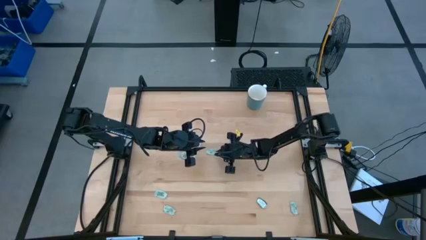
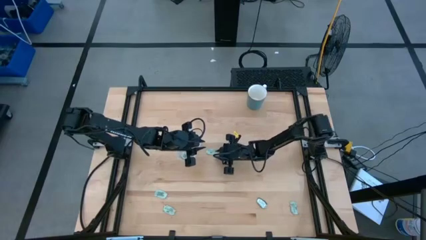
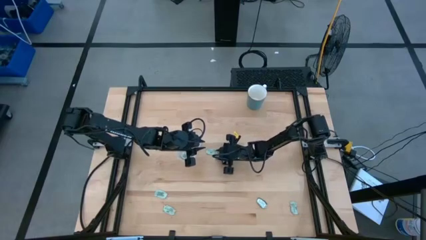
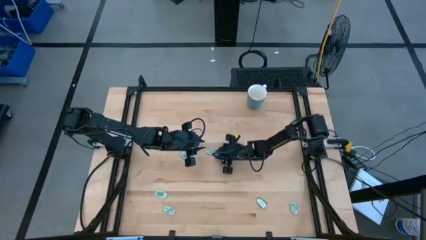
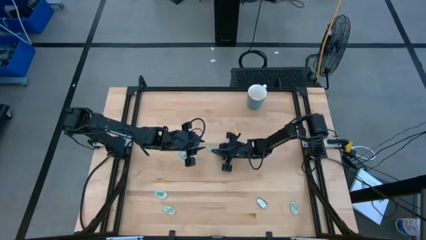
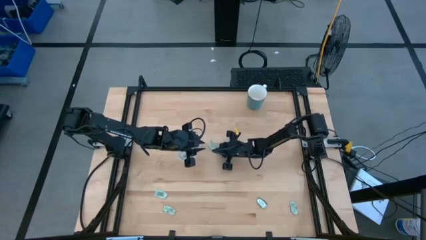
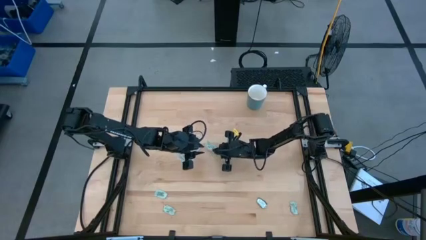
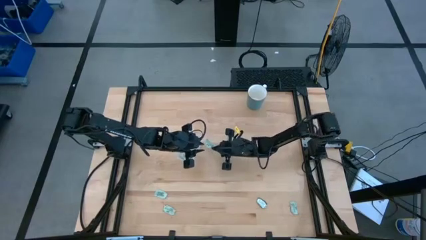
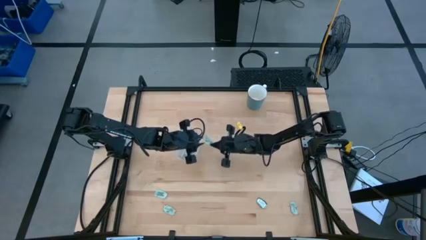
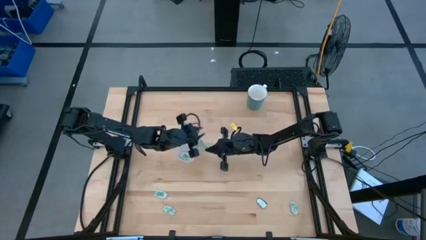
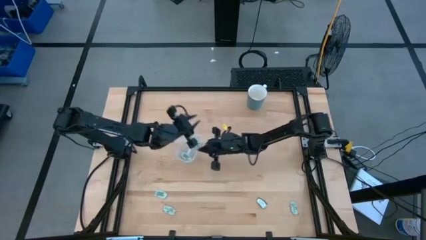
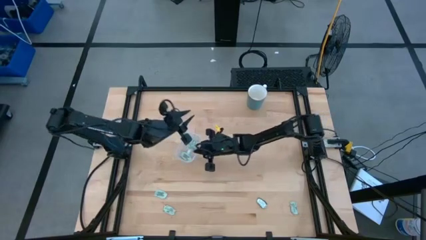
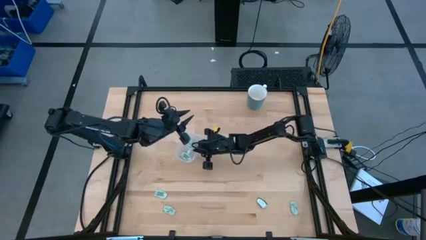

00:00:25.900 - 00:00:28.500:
Task: Pick and place Stevia / Truvia into bins
Put the green stevia packet into the transparent bin

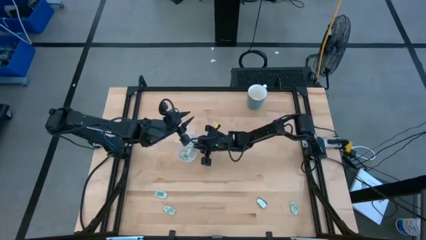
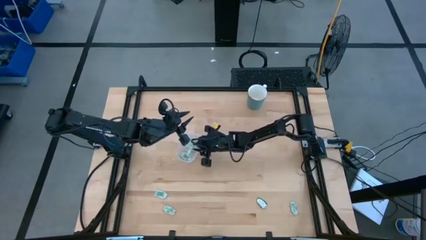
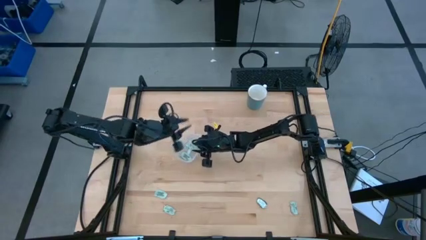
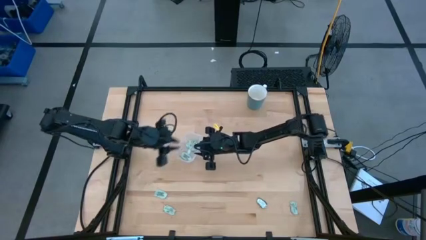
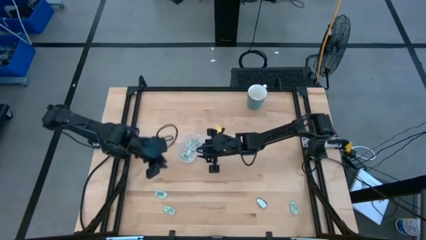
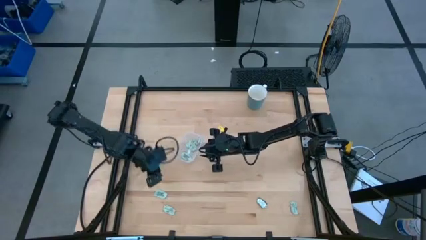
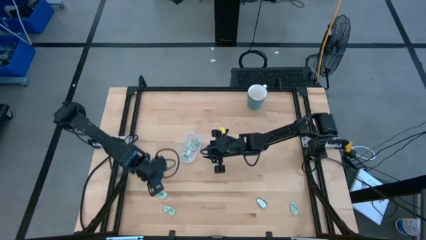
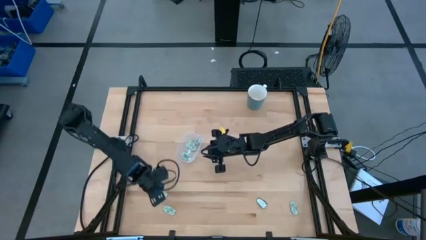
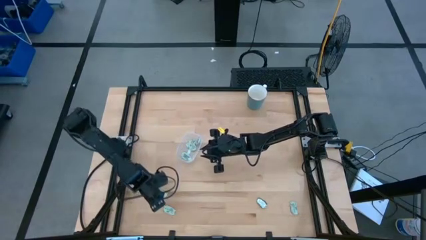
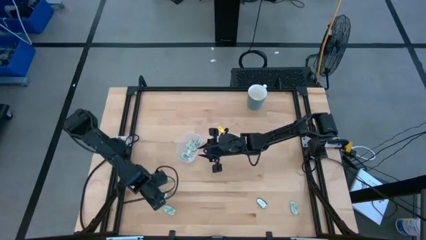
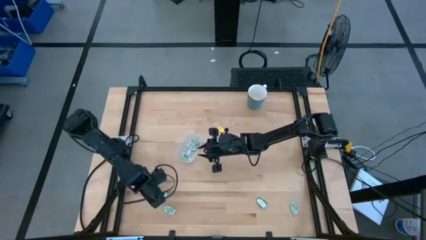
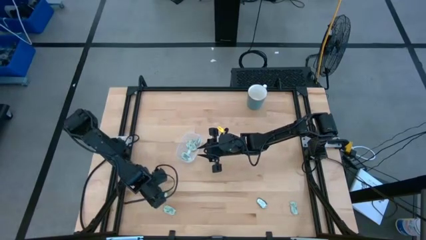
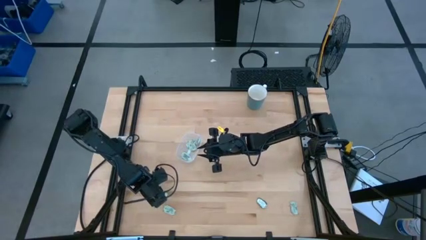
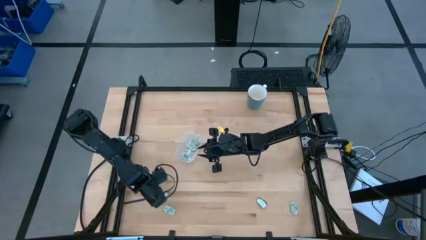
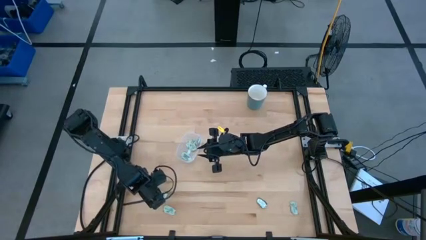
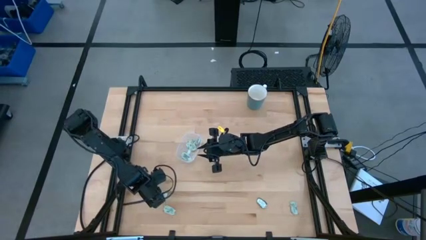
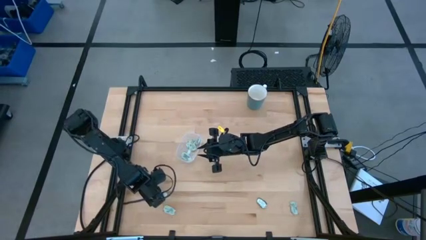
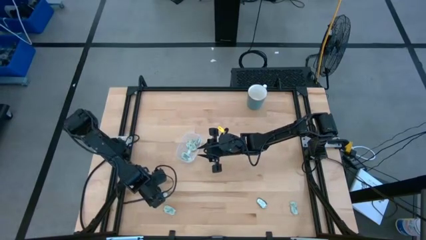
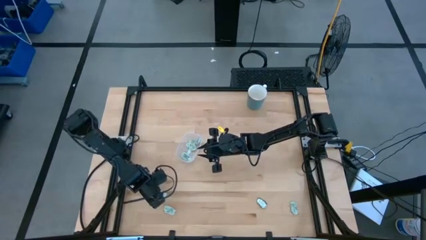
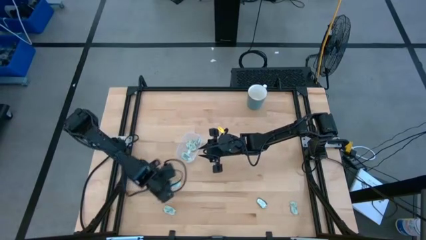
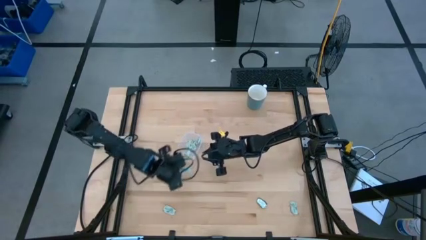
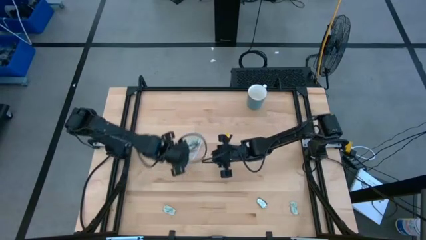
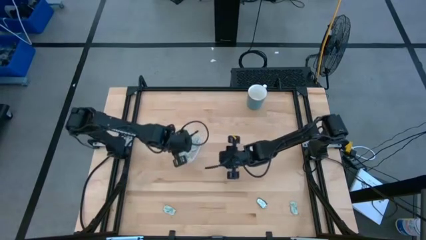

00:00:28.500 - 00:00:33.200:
Put the green stevia packet into the transparent bin

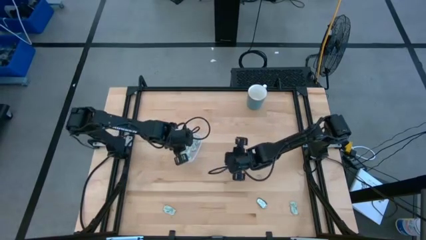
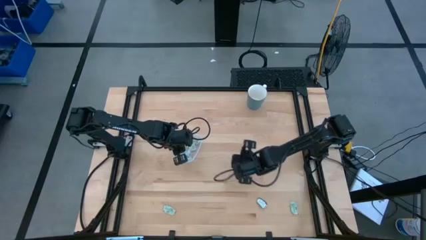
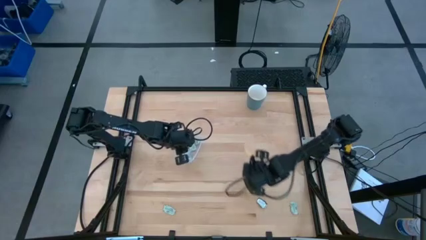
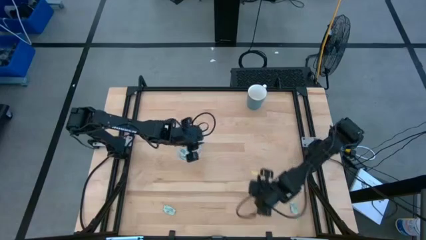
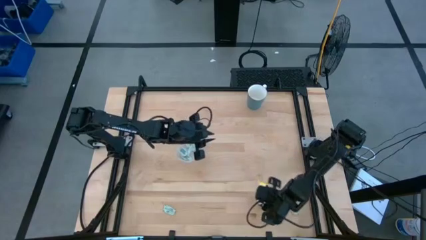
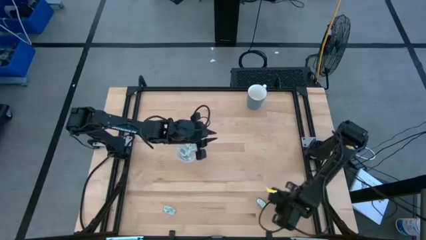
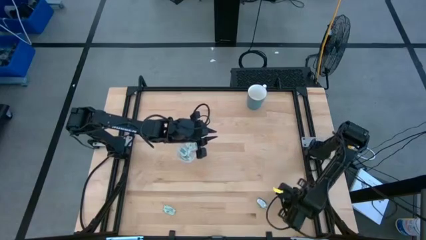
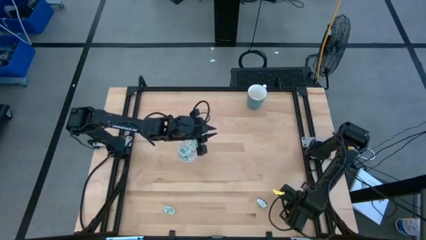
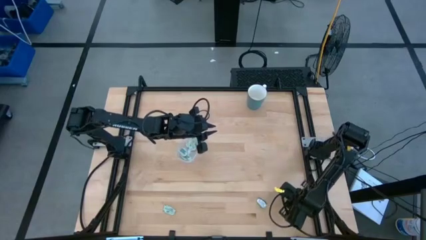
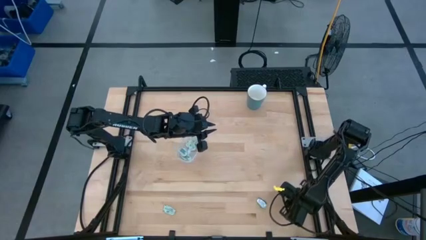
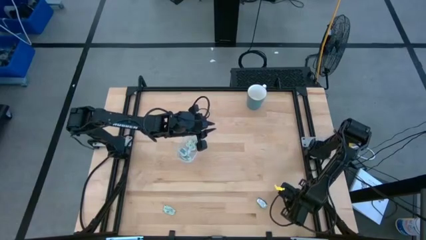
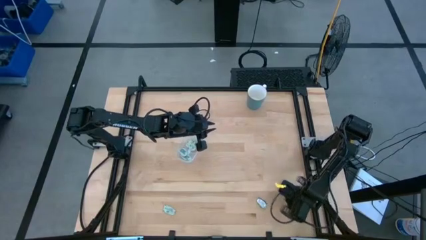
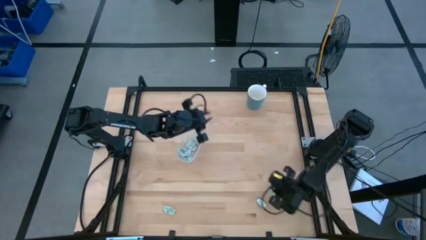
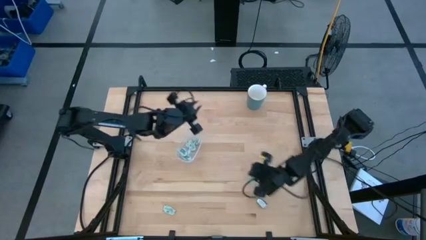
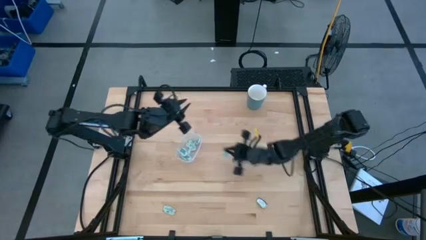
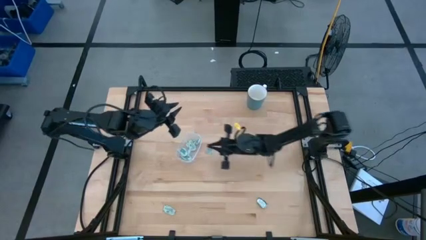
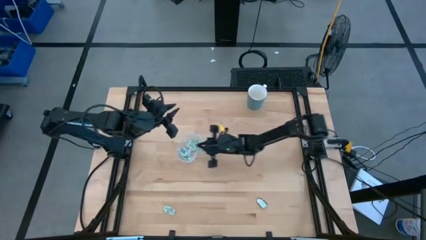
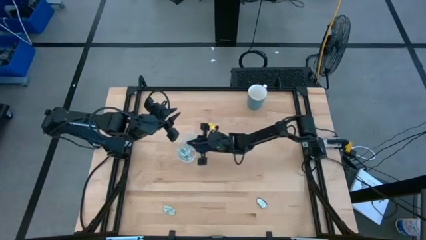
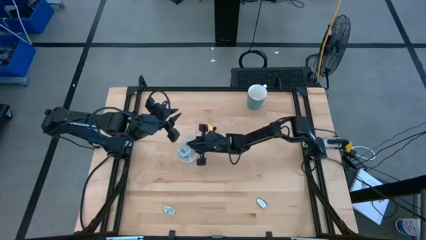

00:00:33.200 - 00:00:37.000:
Put the green stevia packet into the transparent bin

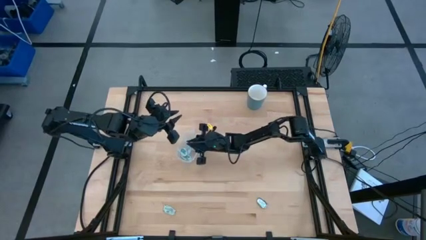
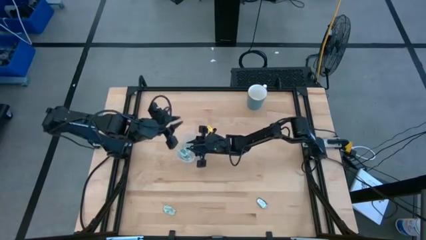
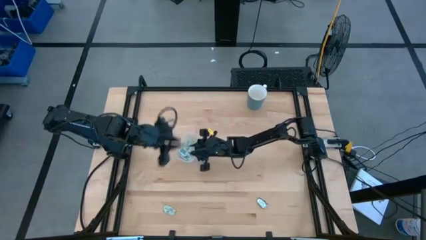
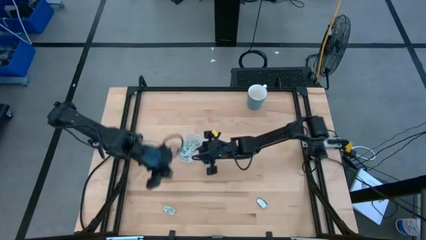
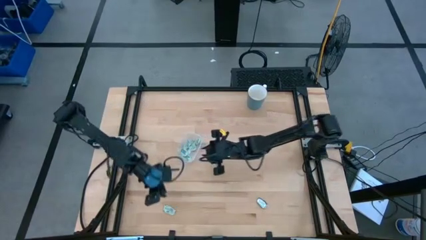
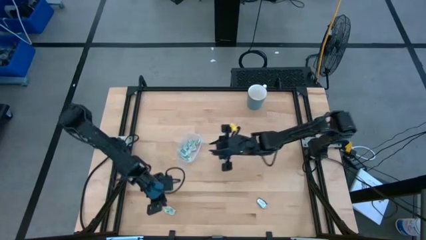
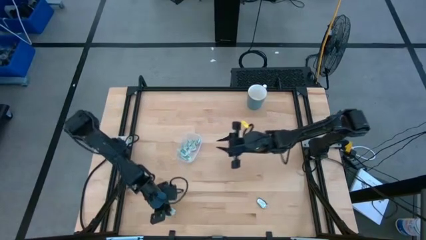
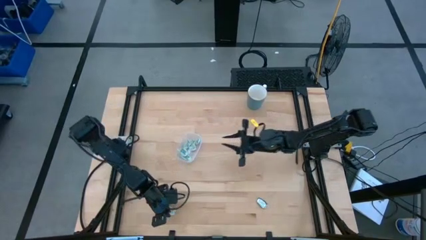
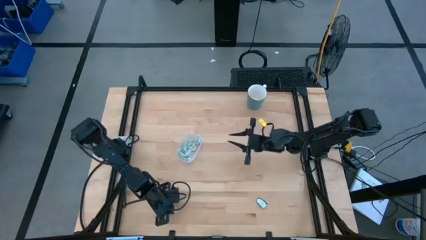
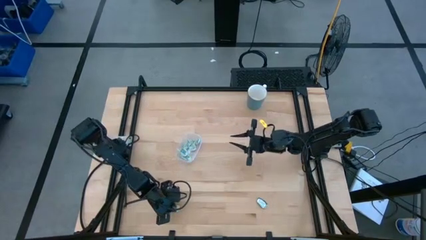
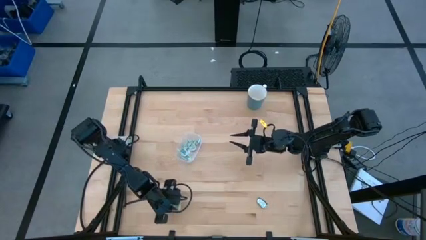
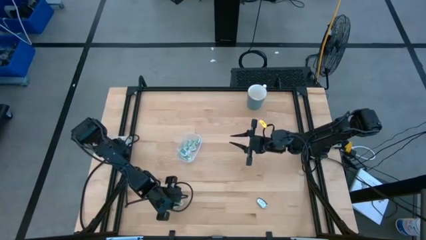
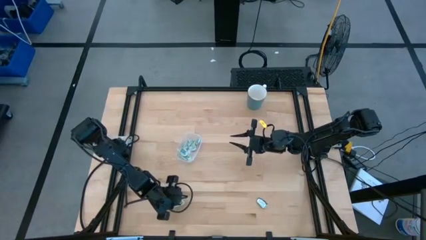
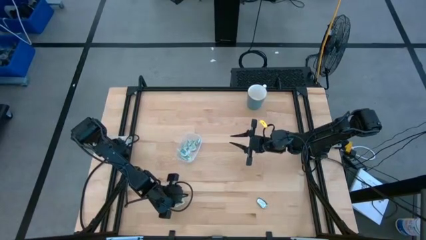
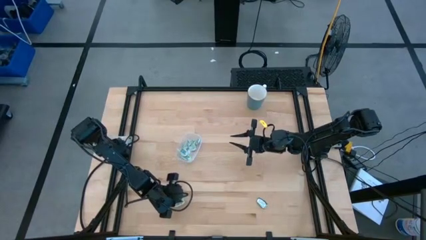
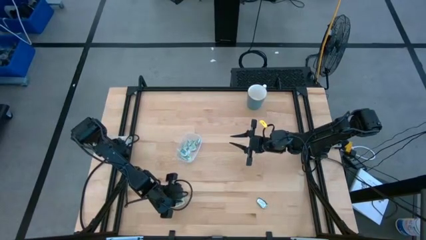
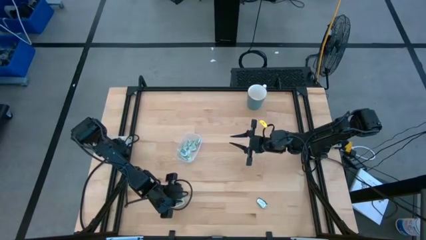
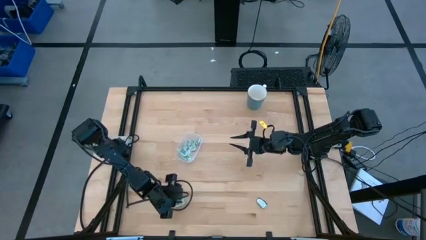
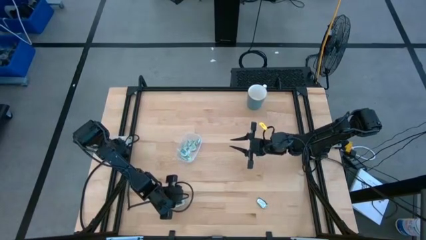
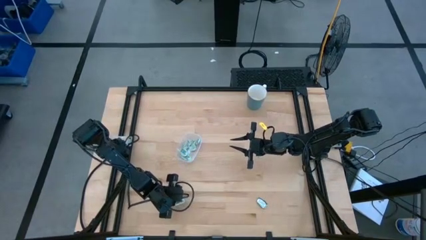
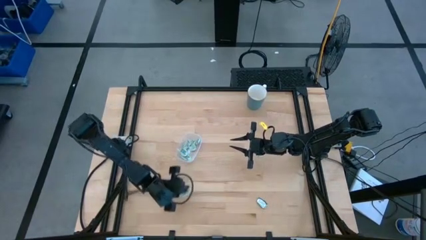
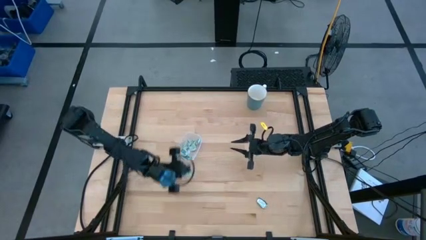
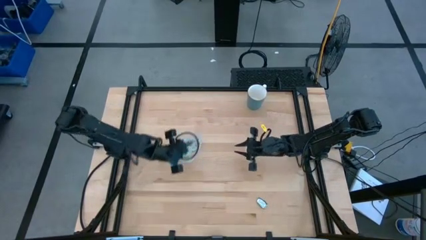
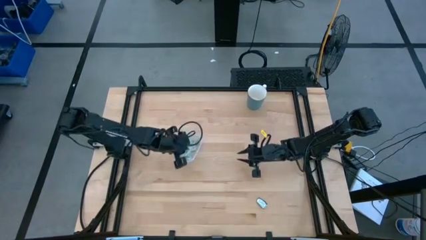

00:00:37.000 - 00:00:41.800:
Put the green stevia packet into the transparent bin
